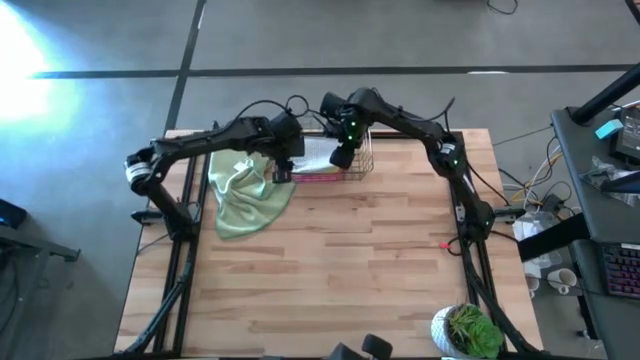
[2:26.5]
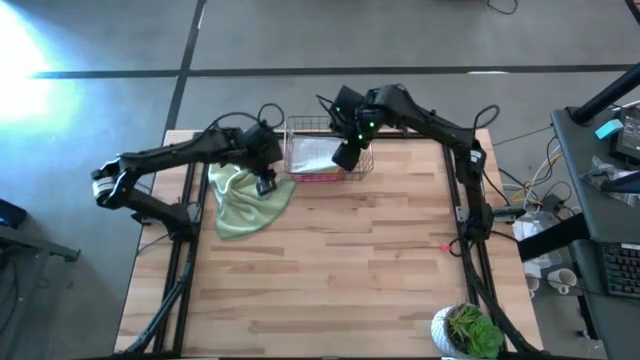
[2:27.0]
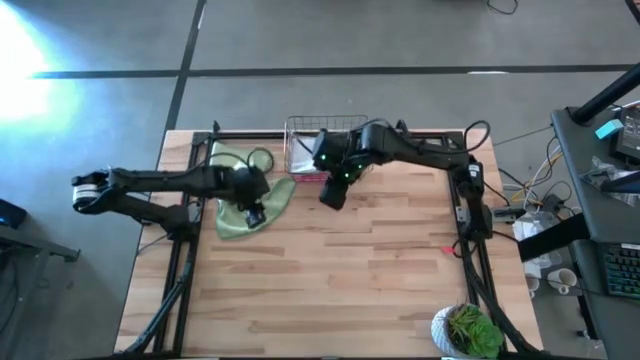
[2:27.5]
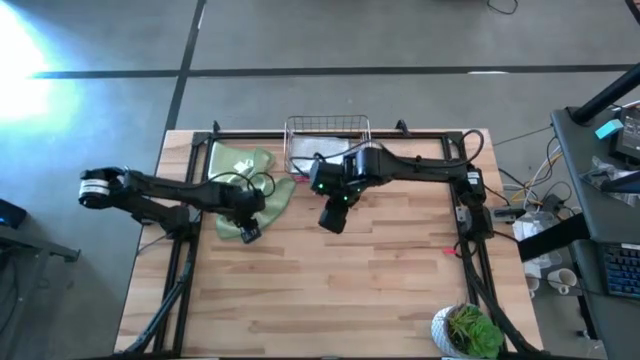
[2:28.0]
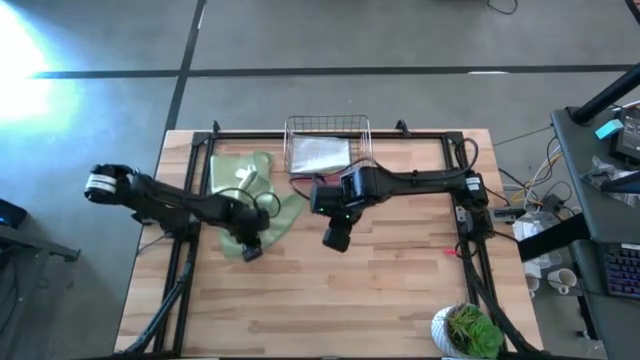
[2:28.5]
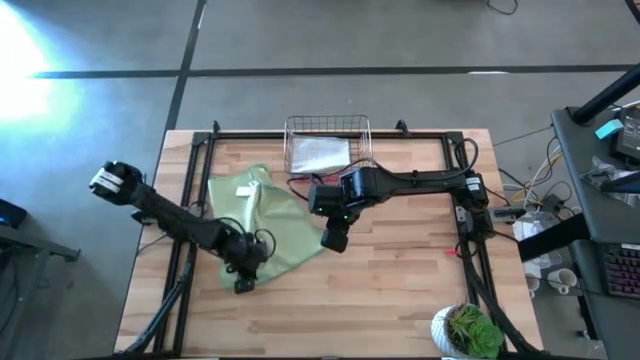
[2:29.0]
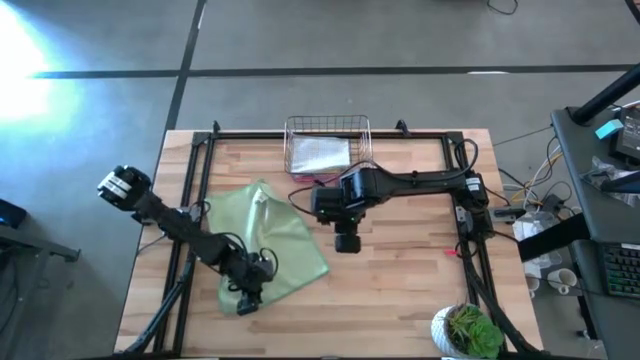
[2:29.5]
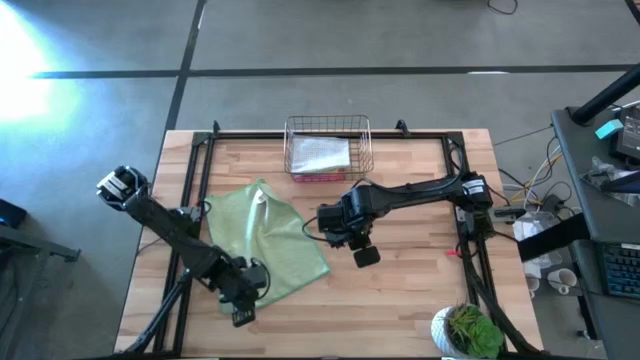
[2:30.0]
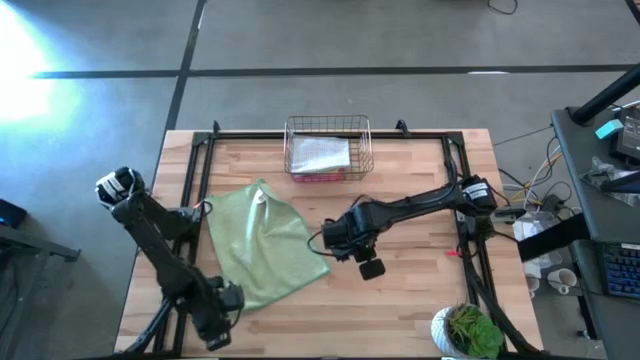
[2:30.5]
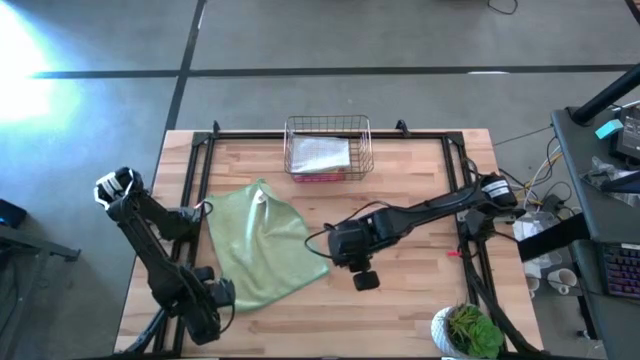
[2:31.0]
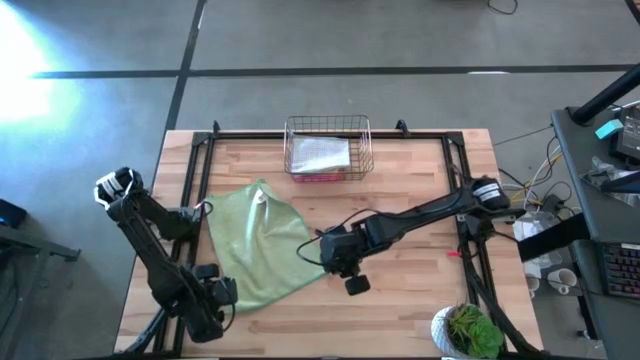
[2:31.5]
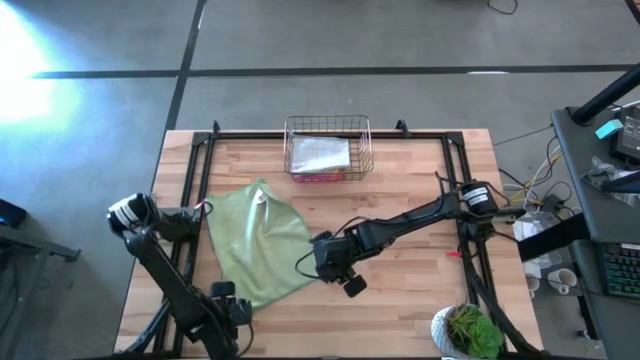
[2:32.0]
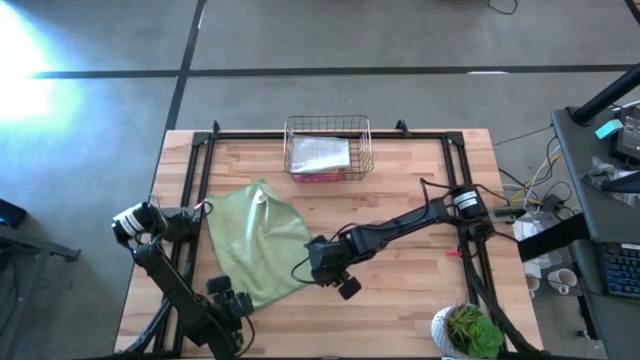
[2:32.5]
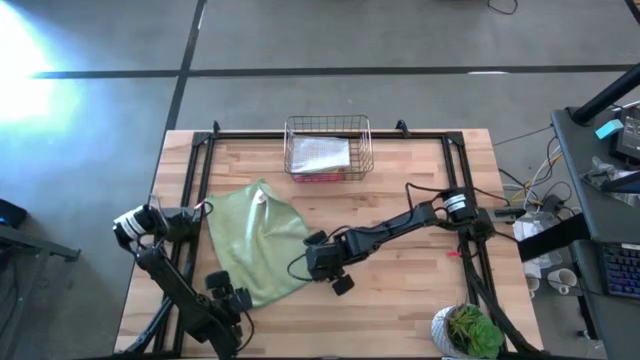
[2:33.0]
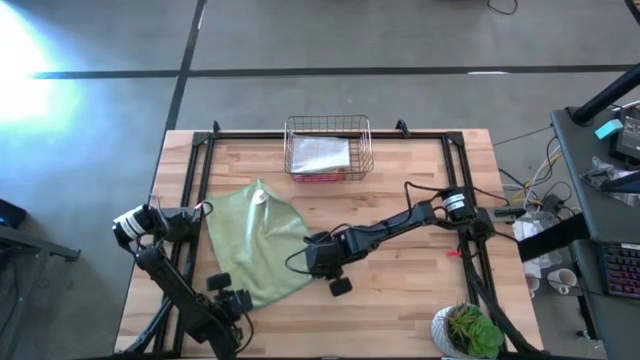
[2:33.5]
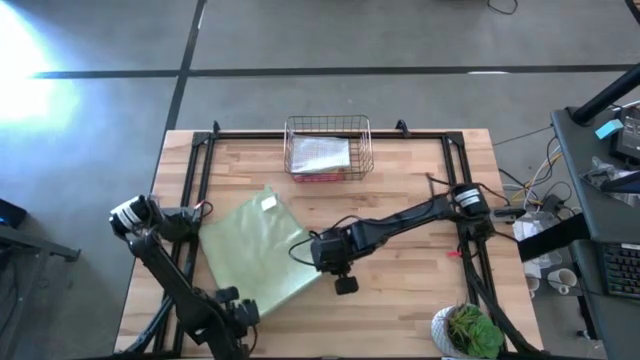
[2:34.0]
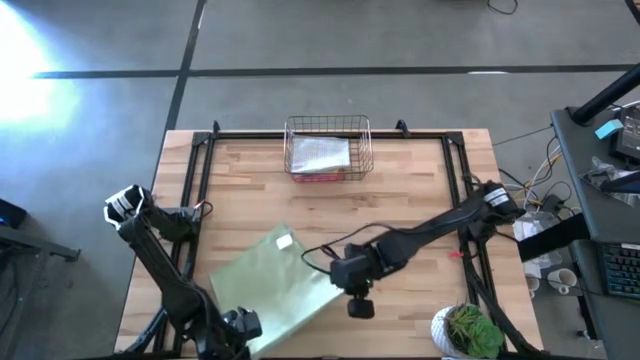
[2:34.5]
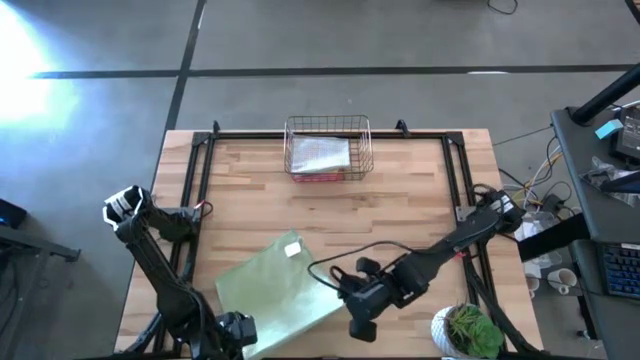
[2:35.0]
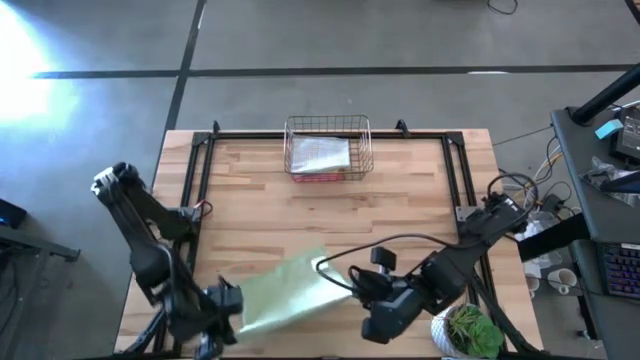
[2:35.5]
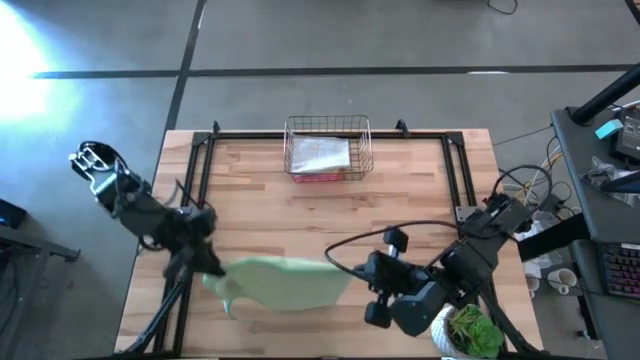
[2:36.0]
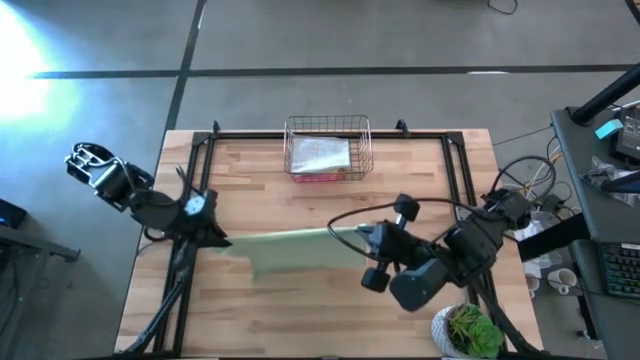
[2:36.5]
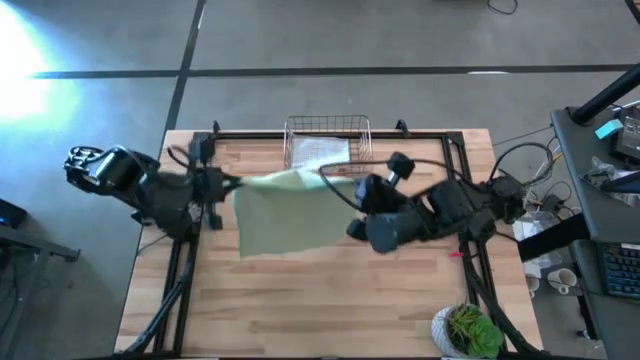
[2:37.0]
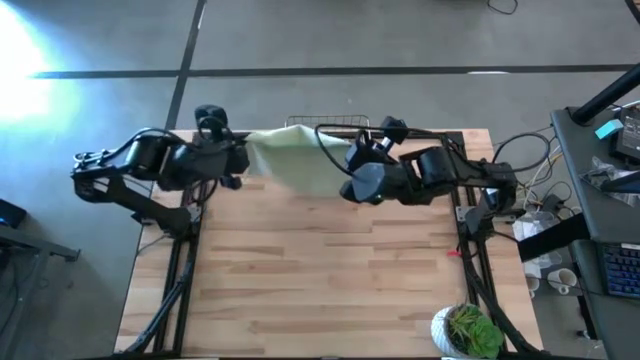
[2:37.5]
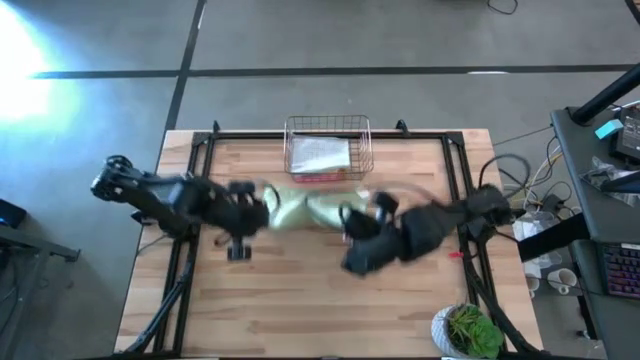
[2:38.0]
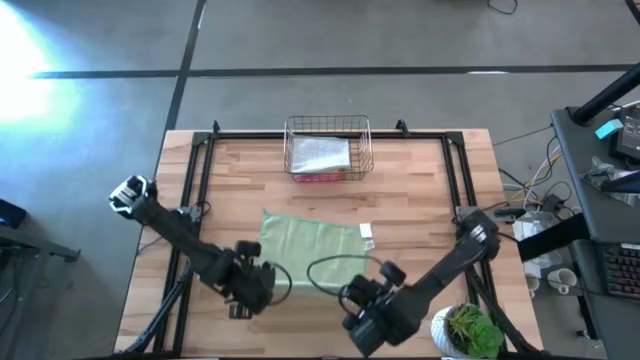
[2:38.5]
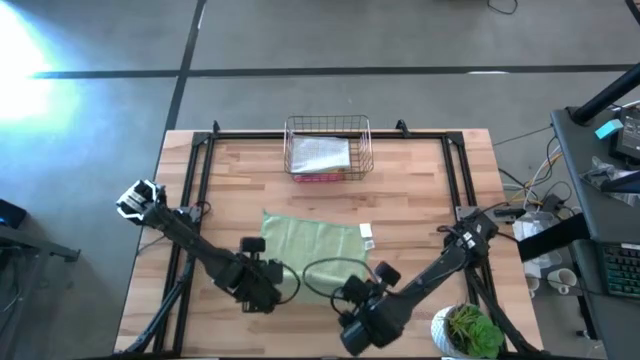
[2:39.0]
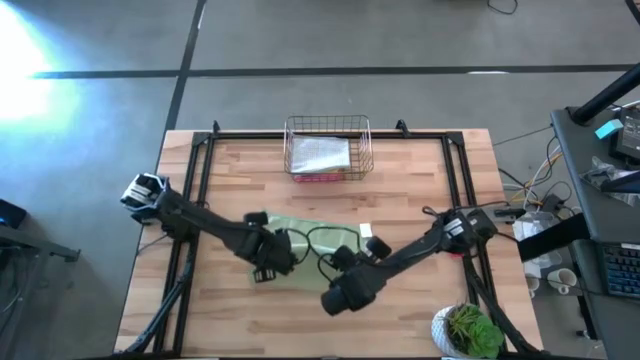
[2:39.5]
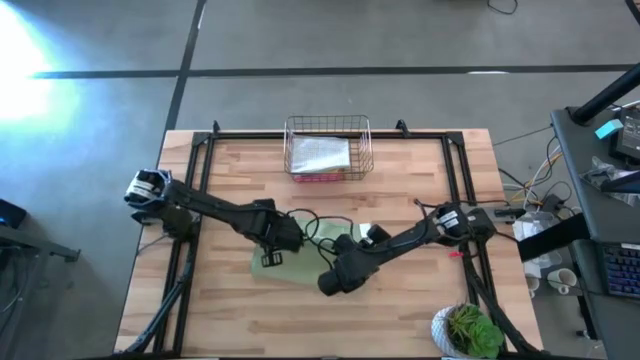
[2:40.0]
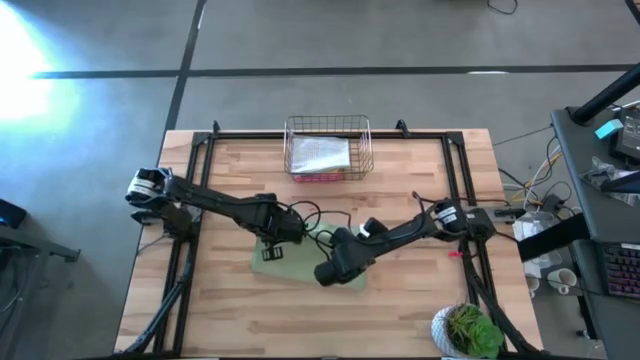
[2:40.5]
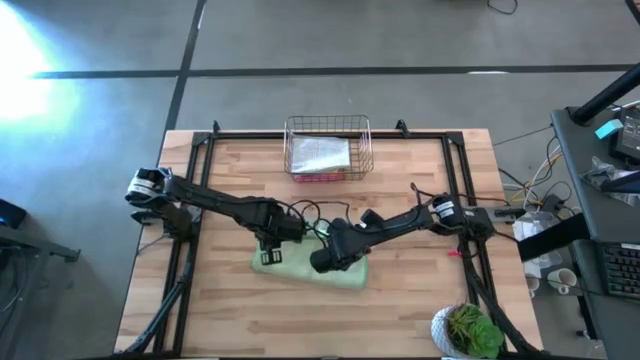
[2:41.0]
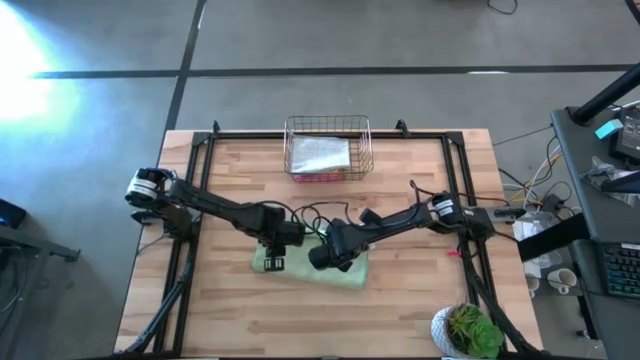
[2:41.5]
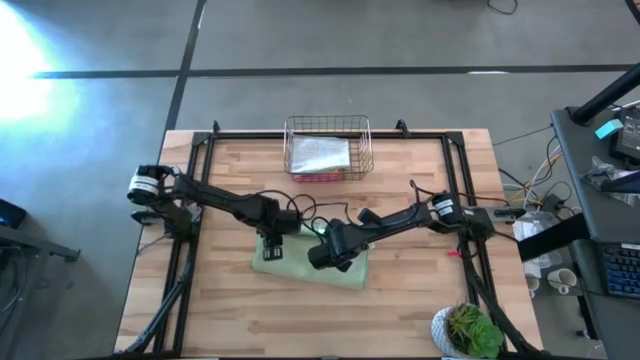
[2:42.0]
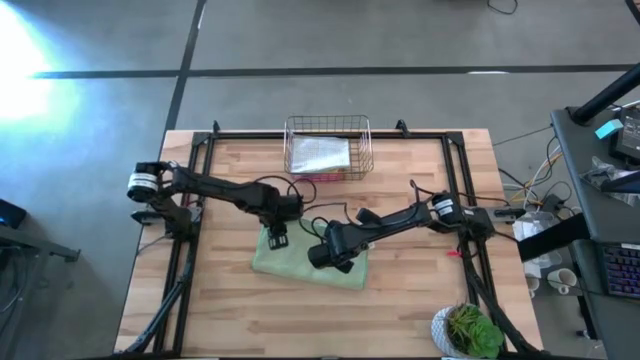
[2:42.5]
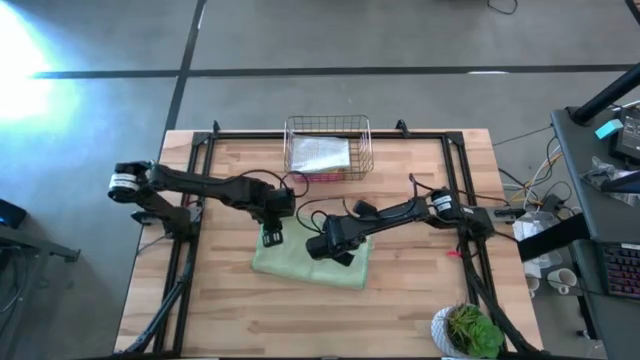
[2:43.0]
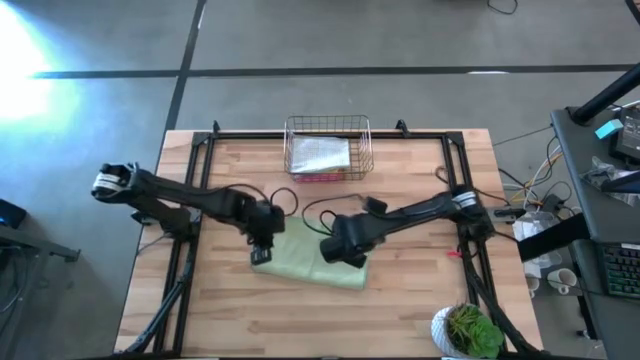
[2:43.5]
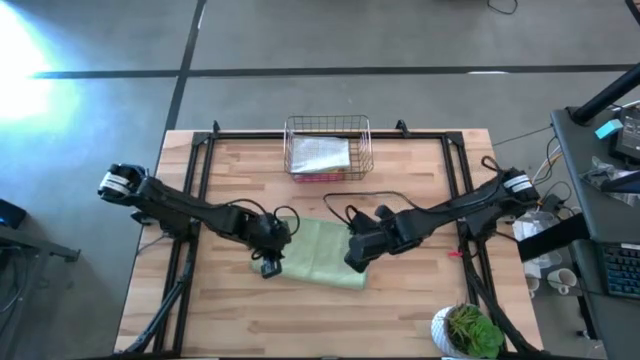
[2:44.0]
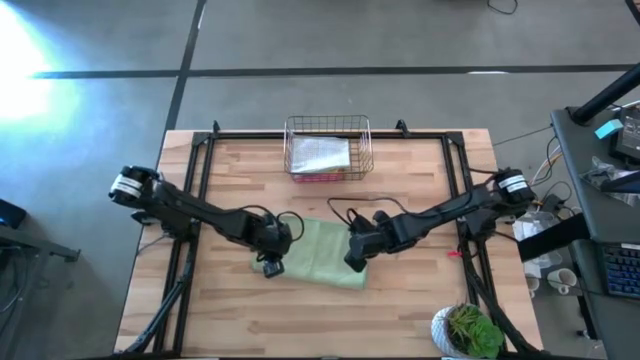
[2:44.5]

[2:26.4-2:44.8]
Task: Fold microfiber towels
Fold the light green microfiber cloth

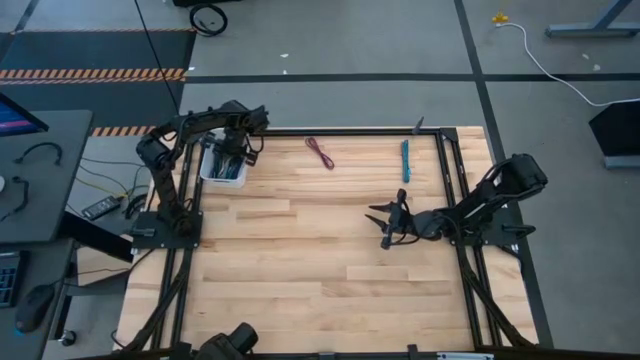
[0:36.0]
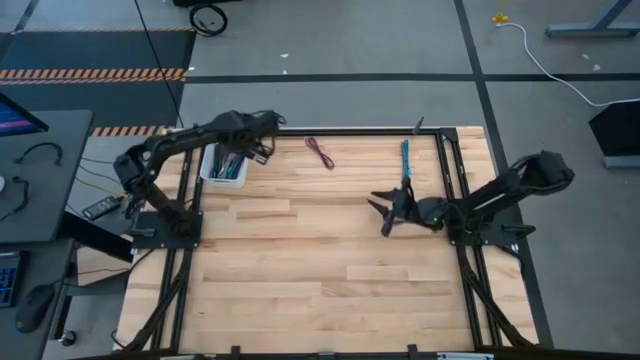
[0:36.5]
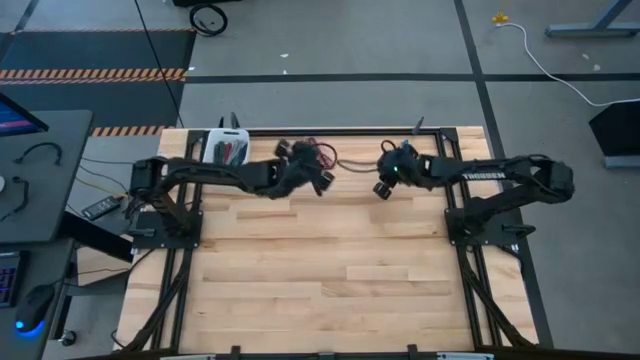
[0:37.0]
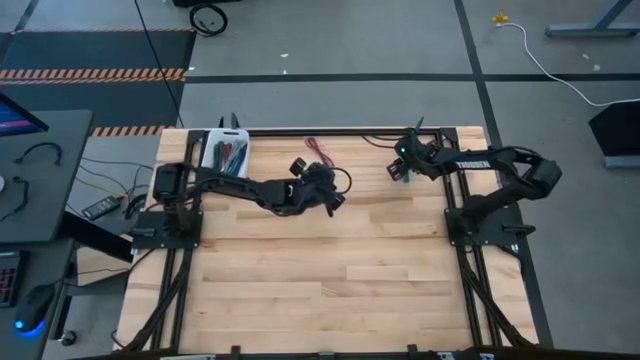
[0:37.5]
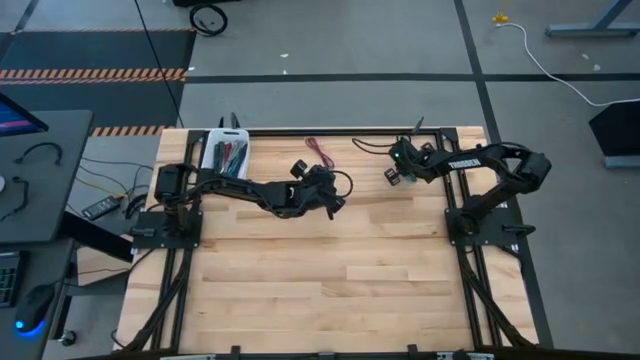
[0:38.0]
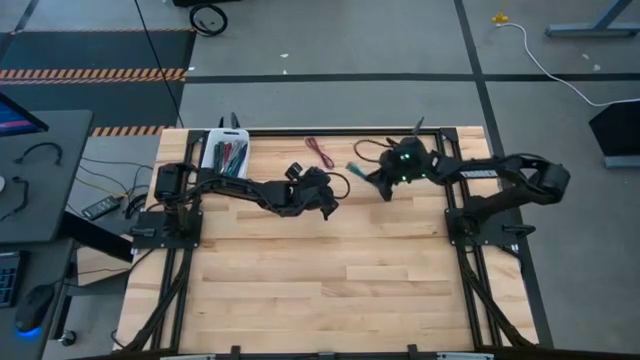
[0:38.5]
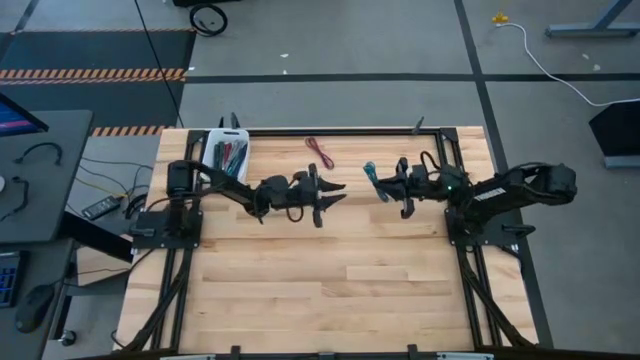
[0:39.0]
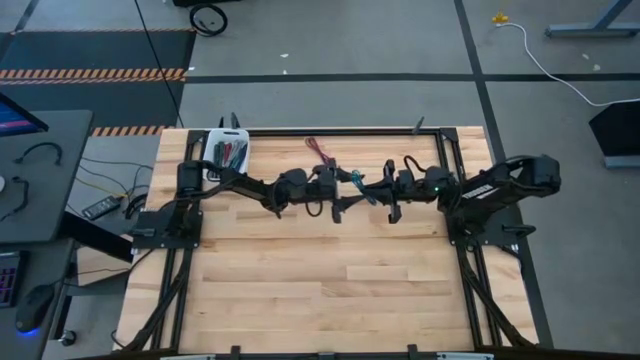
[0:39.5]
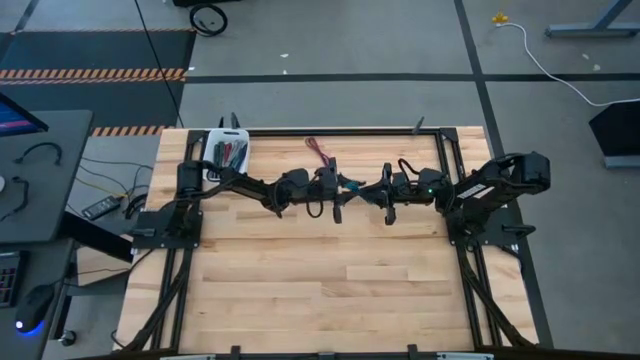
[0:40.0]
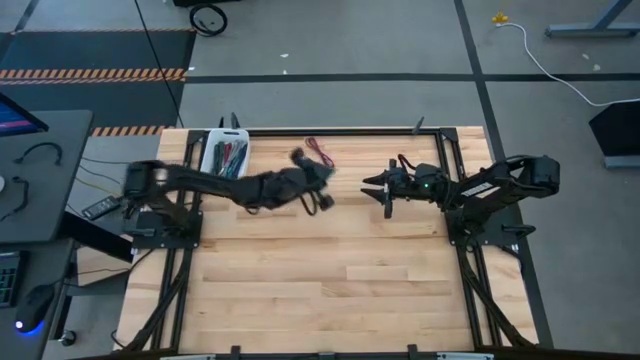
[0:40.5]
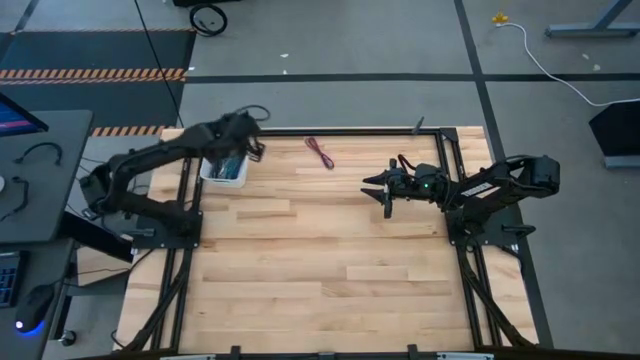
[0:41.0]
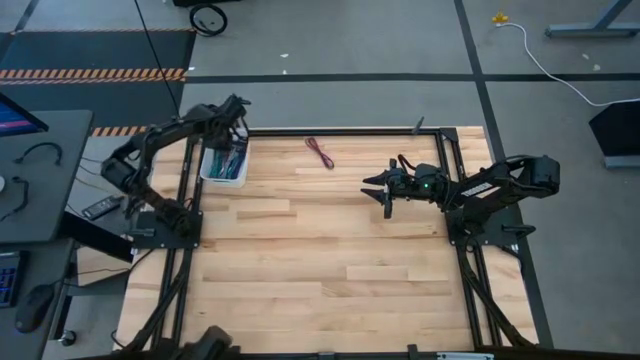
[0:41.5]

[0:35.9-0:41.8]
Task: Pick and place USB-C Cables
Put the blue charger cable into the white bin
